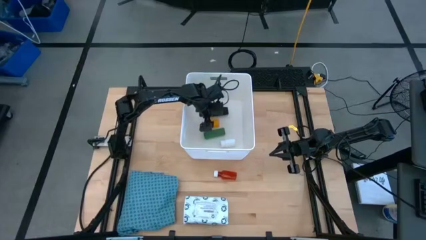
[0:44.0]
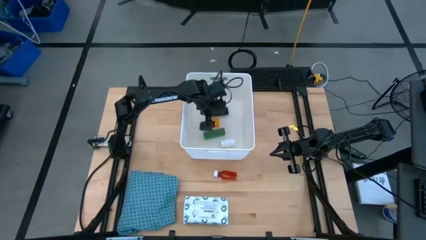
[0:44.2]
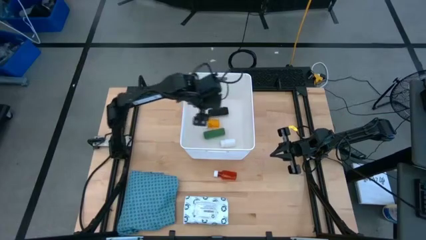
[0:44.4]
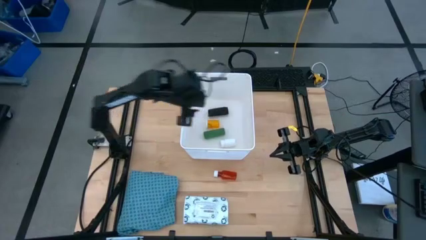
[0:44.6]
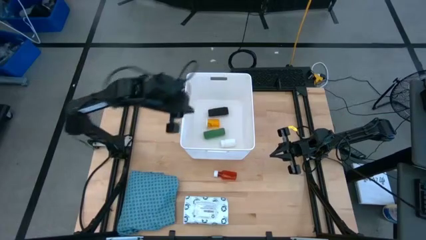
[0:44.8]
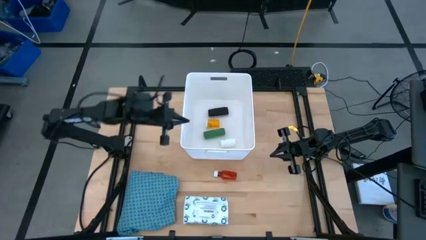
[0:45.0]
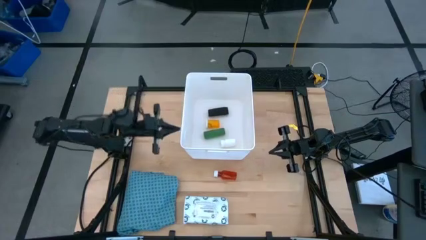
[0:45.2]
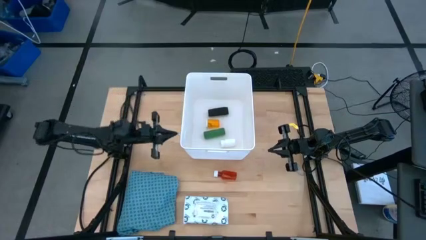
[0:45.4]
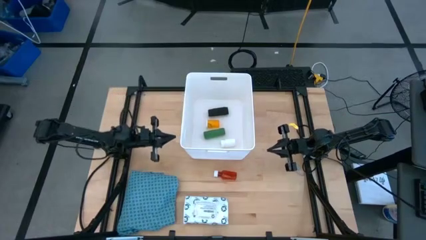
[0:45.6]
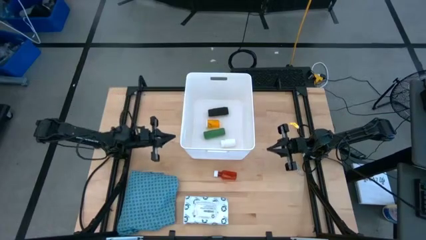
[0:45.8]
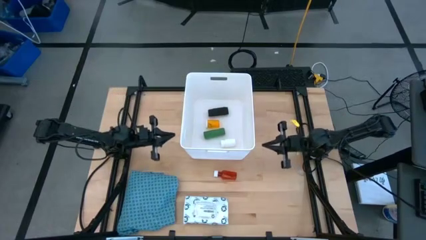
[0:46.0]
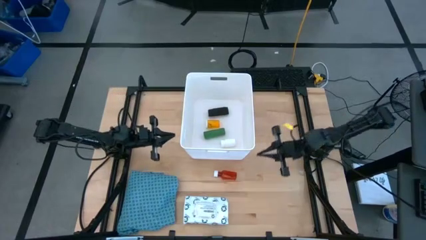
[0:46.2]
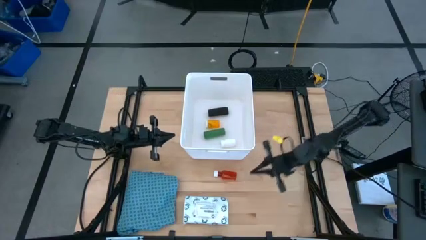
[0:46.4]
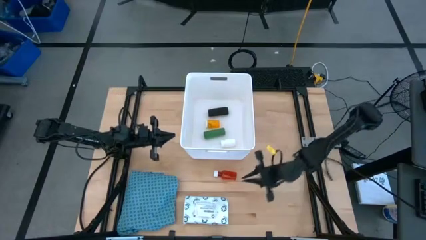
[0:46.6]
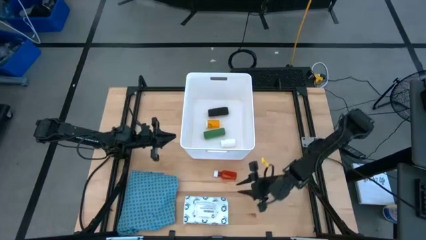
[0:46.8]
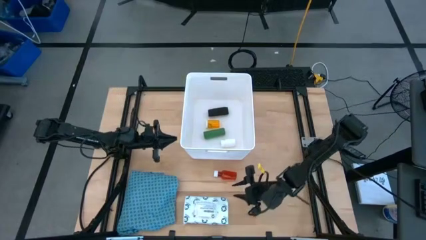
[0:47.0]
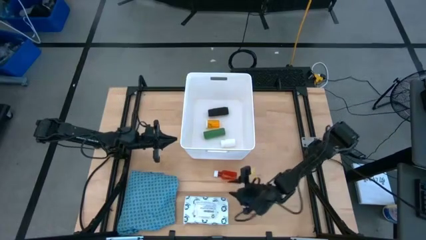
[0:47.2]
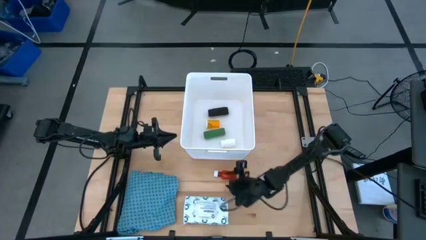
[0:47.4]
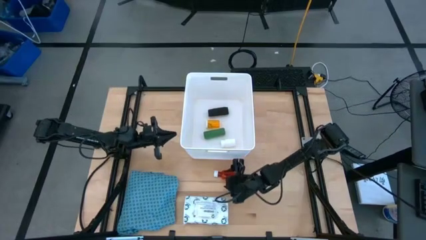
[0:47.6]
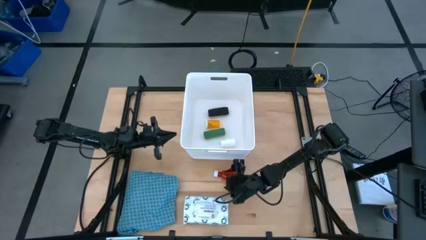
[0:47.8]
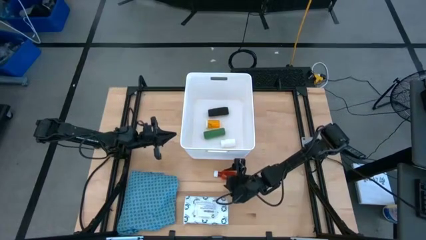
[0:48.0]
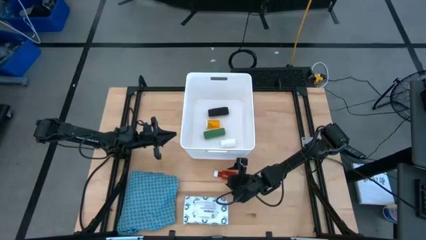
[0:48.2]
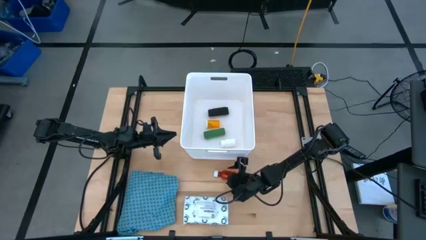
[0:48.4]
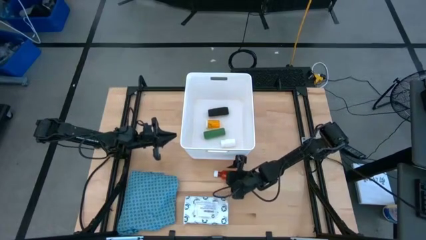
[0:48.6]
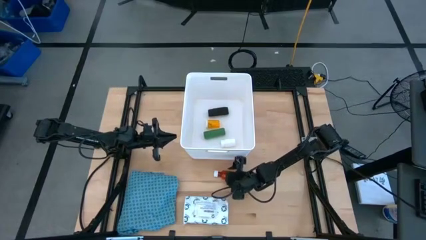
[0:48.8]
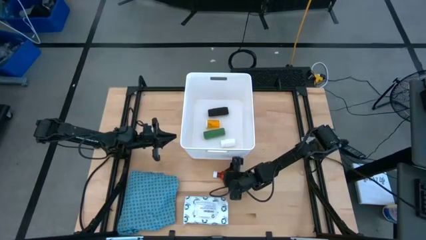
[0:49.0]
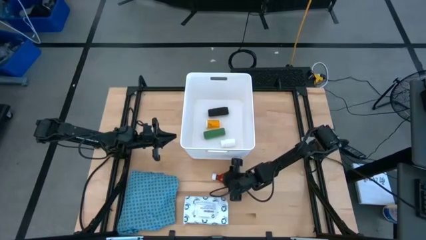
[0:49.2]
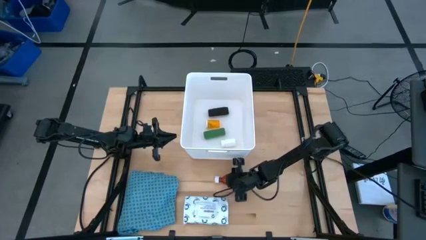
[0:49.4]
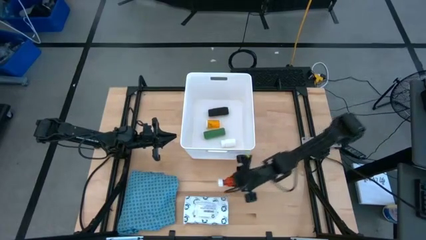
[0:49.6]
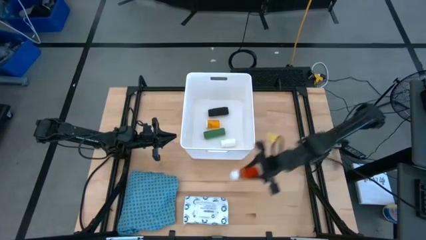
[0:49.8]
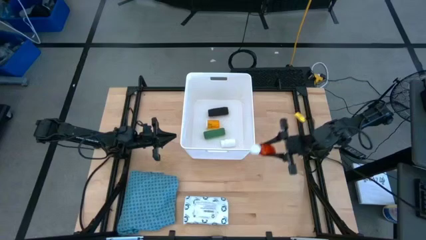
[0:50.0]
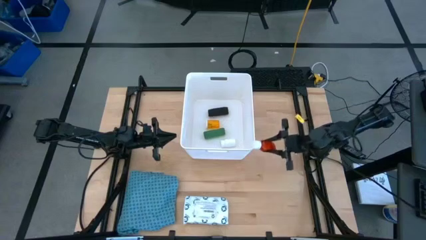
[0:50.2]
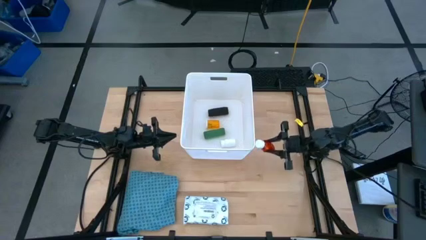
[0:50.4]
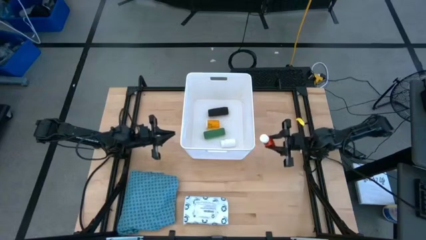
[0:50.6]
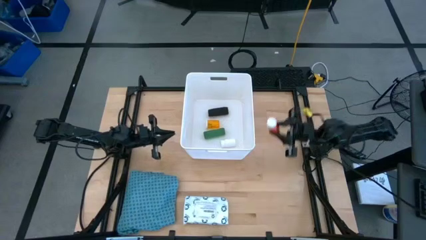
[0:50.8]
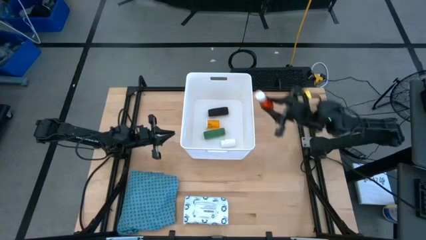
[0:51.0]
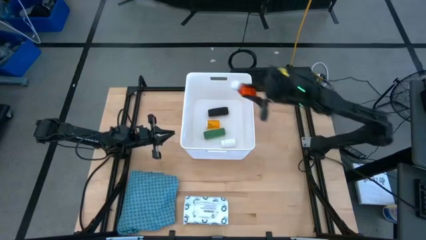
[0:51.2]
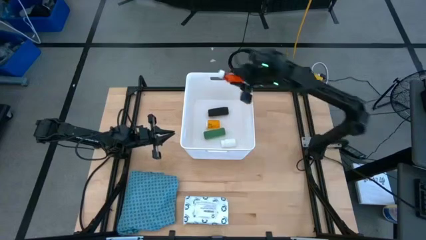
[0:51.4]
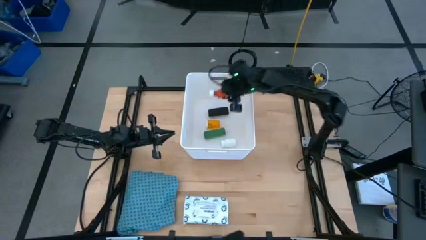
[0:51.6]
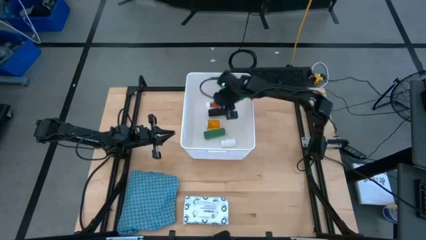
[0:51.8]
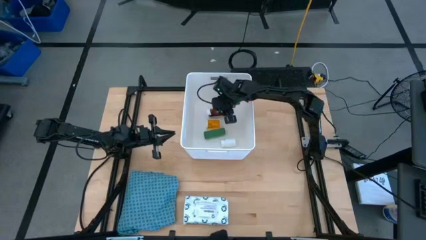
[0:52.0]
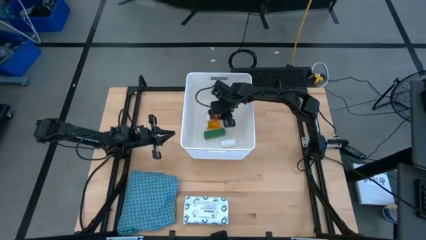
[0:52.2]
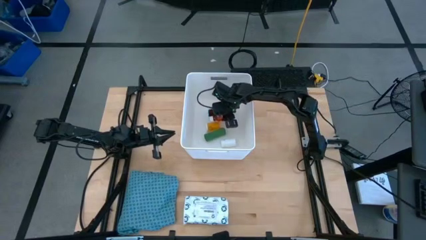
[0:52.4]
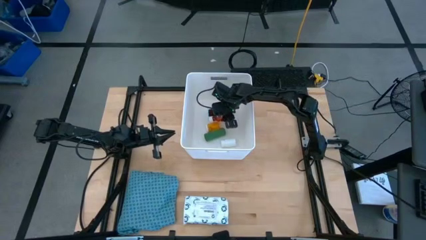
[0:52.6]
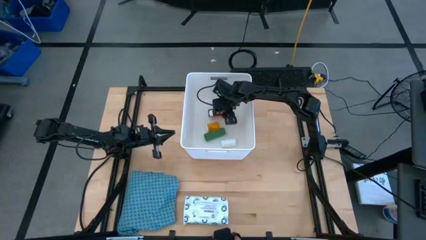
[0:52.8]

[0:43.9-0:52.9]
Task: Pick & place medical supplies in basket/bin
Put the red medicine bottle into the bin

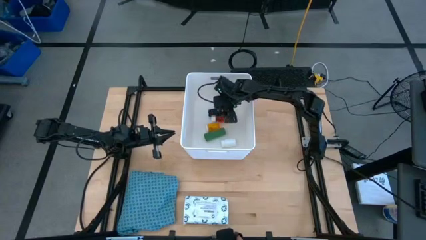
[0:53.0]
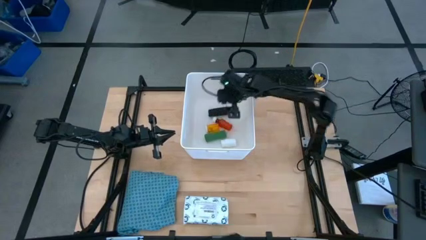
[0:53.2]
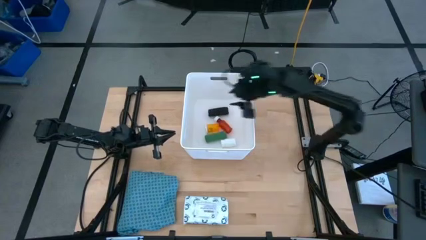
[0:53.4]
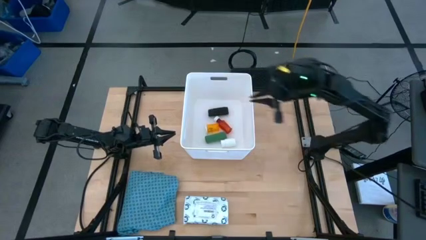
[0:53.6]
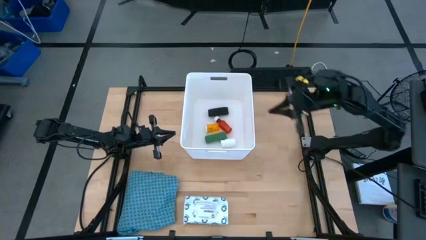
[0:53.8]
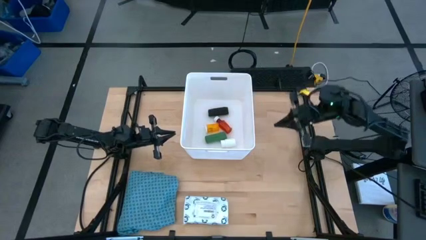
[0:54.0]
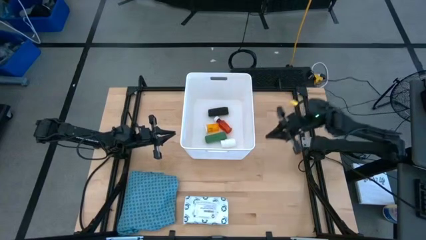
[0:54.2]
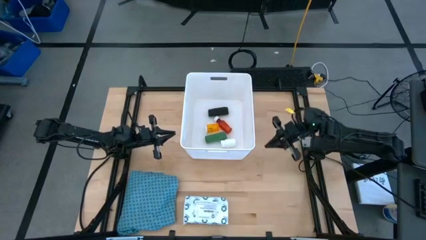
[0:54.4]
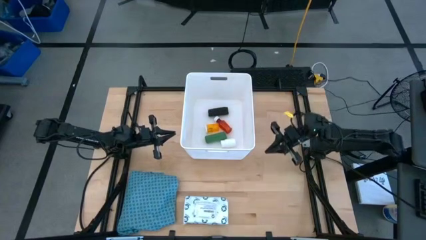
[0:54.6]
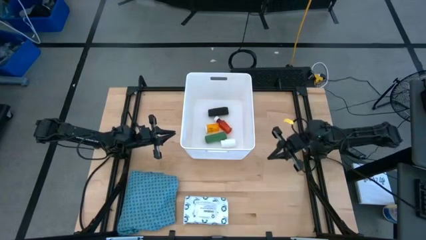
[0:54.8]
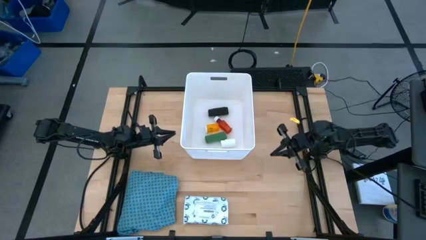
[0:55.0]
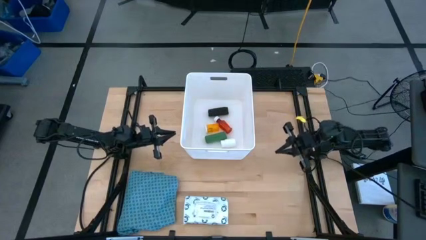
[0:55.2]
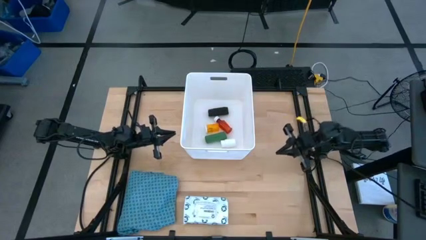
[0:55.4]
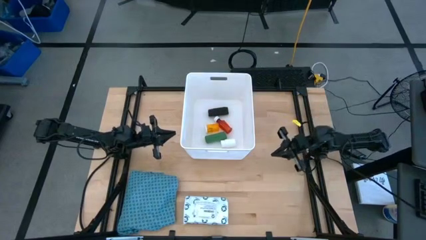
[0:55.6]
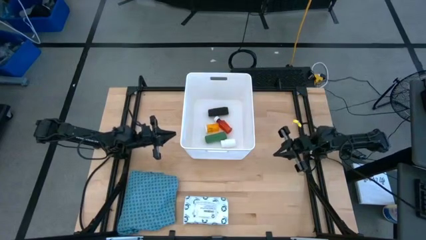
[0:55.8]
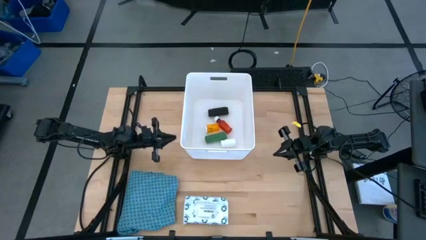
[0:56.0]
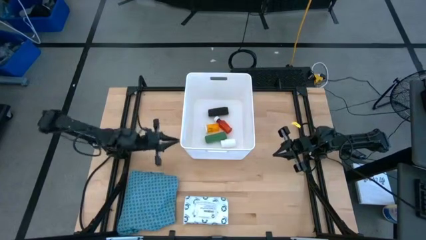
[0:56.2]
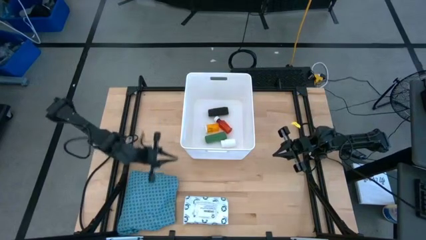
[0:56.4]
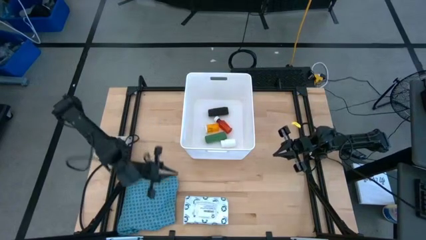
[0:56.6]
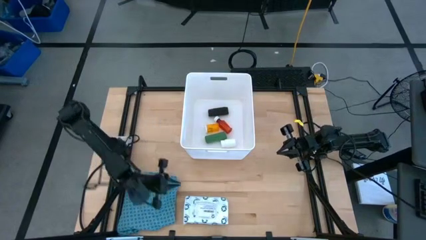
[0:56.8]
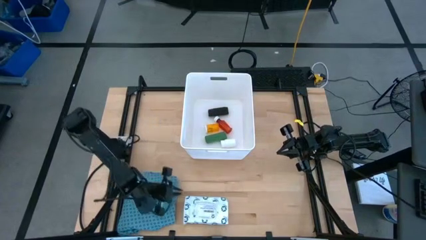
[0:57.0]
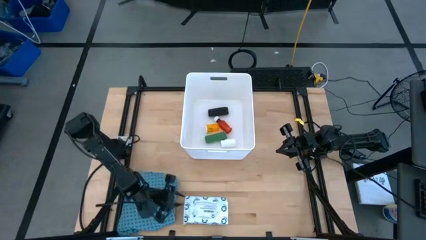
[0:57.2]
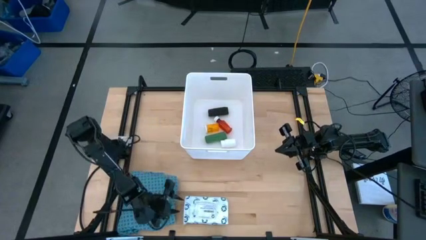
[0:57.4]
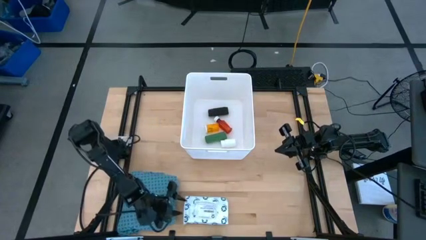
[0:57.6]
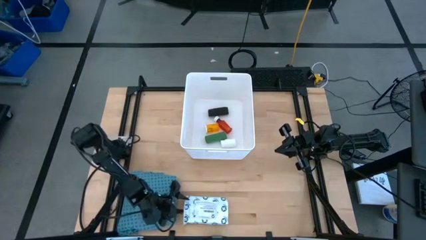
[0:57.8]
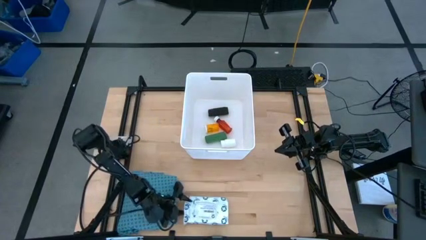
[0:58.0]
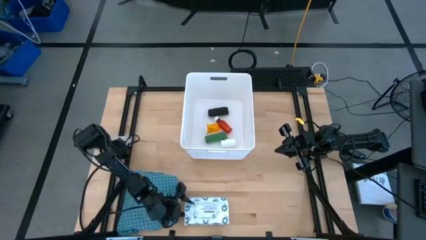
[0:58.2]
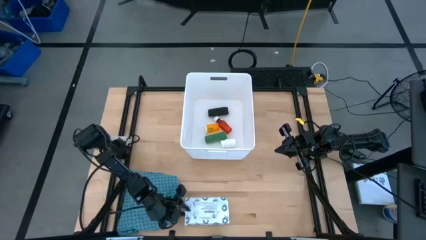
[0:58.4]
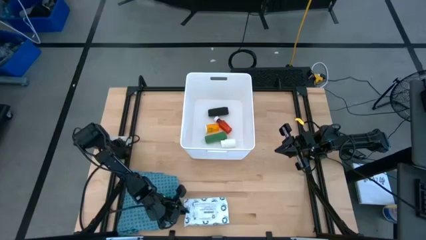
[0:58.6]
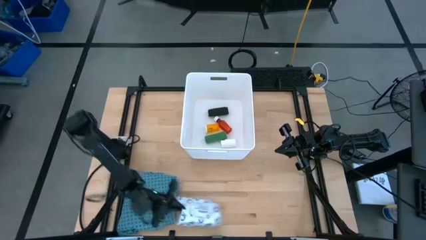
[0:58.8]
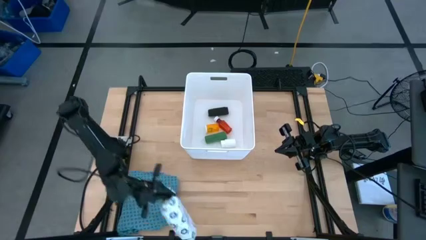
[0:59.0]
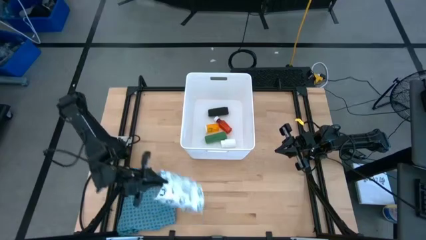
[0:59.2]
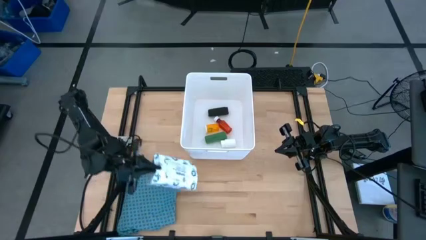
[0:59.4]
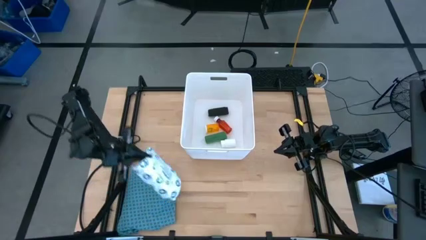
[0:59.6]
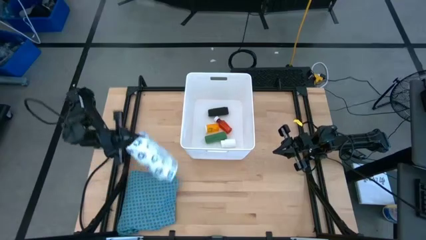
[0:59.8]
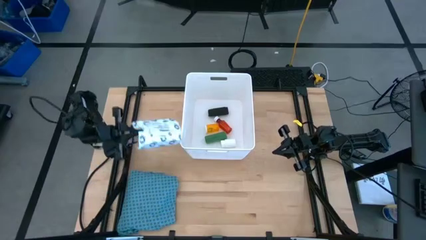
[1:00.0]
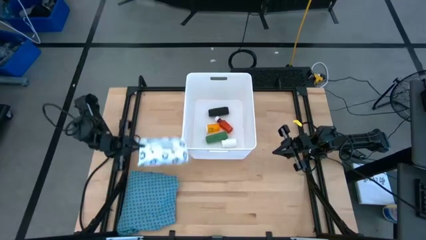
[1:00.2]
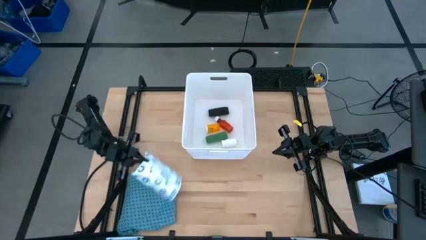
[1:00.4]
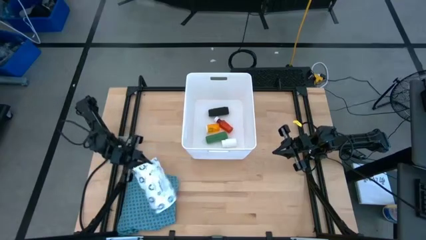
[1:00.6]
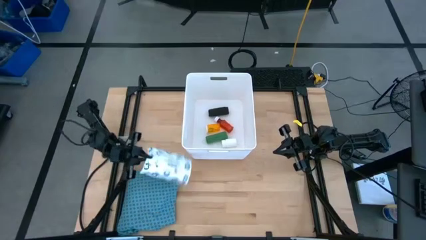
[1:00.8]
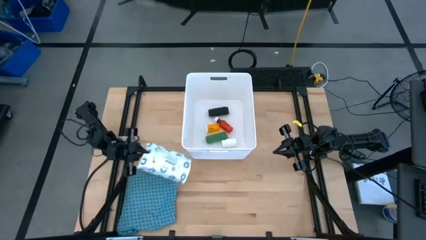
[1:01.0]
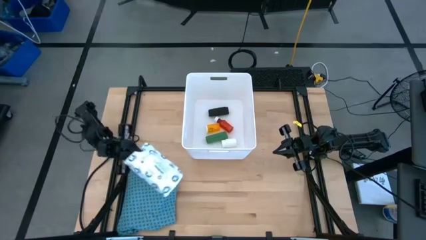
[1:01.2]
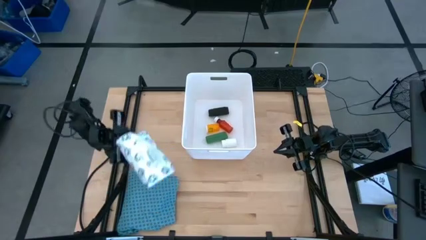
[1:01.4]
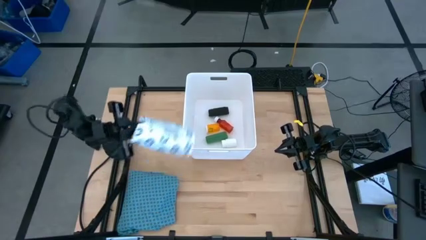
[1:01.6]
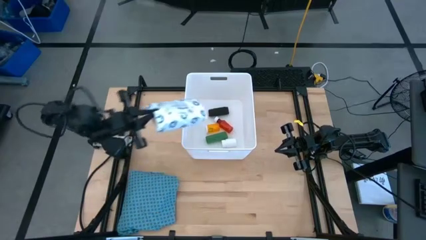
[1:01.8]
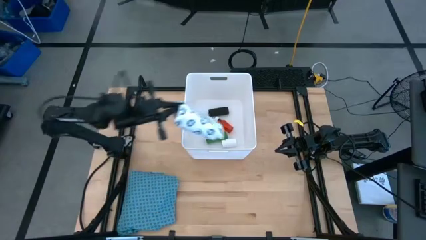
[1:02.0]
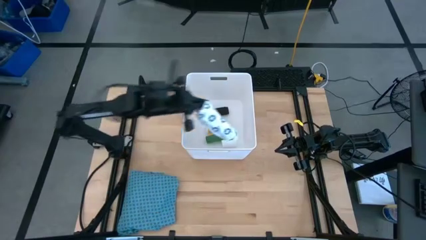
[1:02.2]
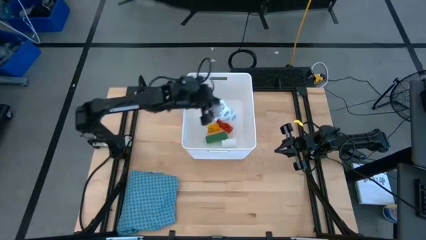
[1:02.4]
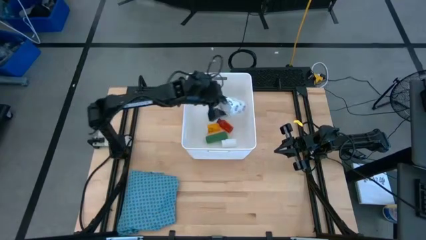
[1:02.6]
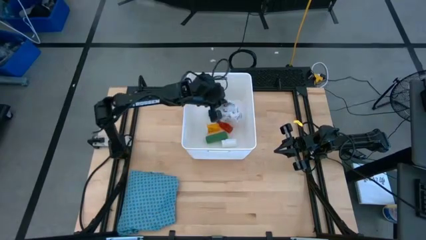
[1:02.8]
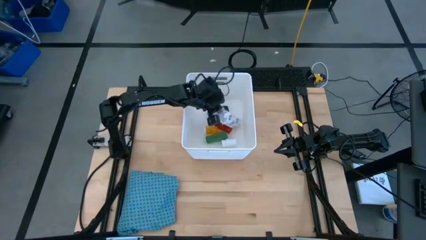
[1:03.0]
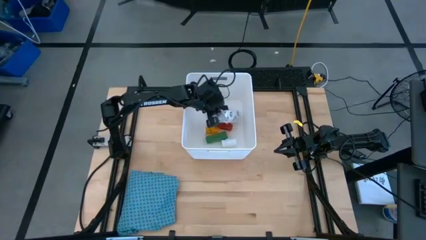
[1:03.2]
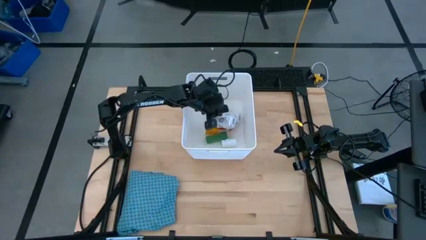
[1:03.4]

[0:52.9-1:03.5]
Put the white mailer bag into the bin
